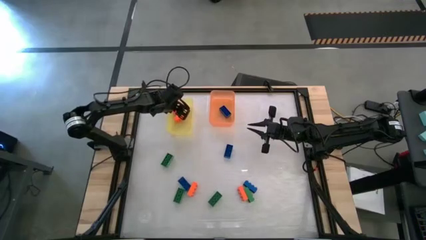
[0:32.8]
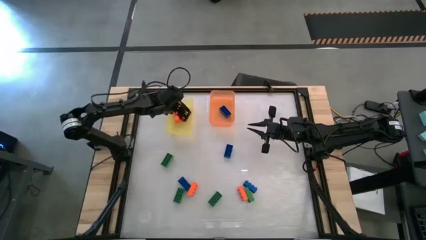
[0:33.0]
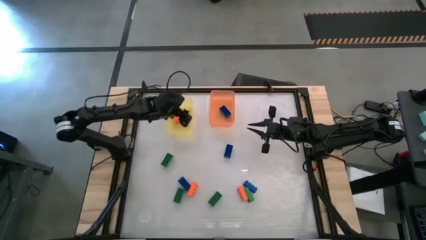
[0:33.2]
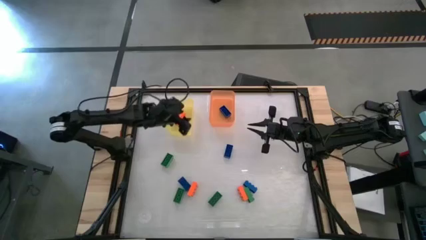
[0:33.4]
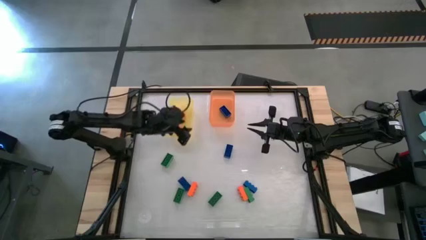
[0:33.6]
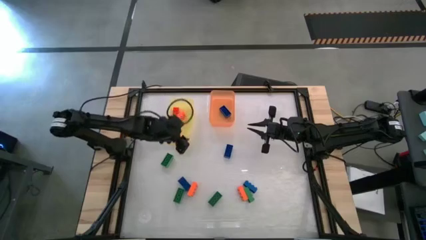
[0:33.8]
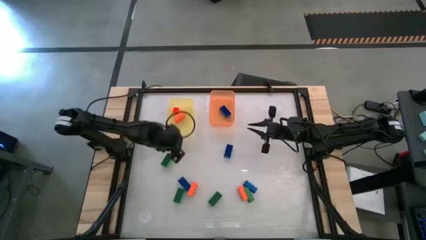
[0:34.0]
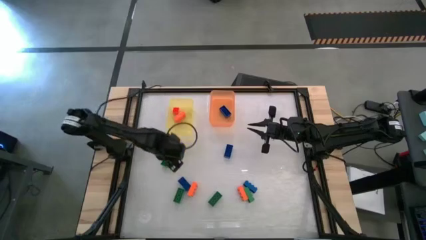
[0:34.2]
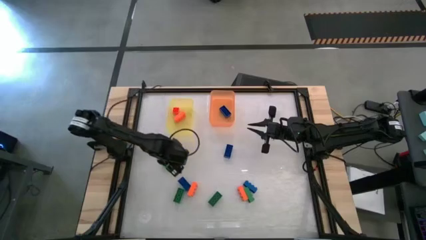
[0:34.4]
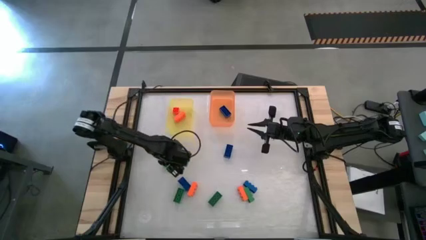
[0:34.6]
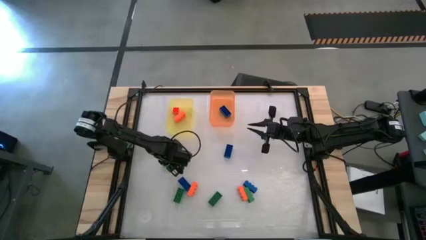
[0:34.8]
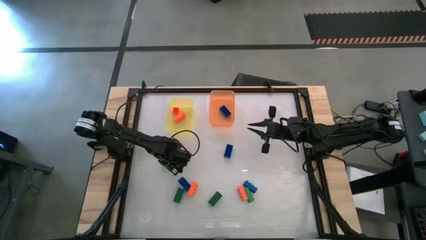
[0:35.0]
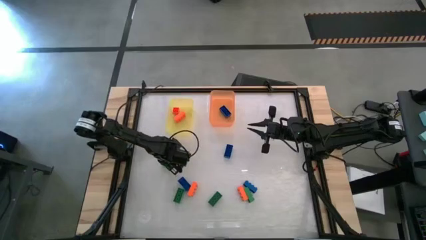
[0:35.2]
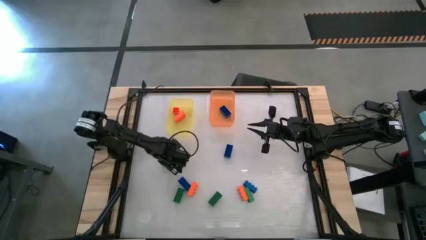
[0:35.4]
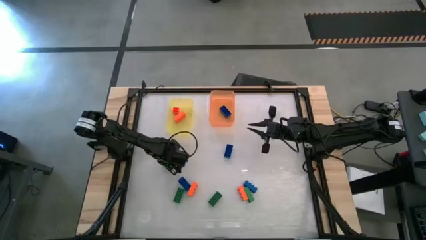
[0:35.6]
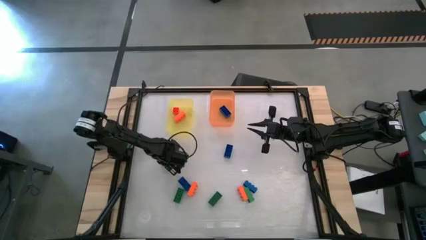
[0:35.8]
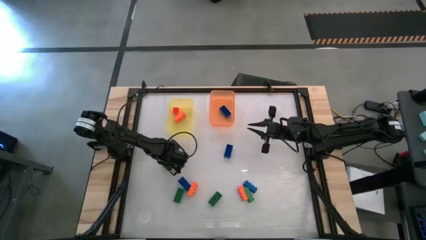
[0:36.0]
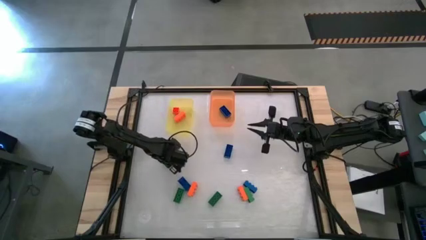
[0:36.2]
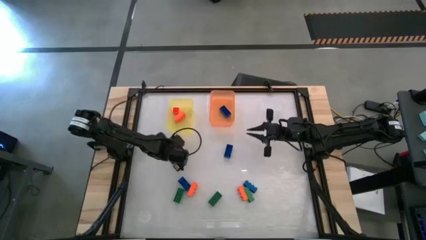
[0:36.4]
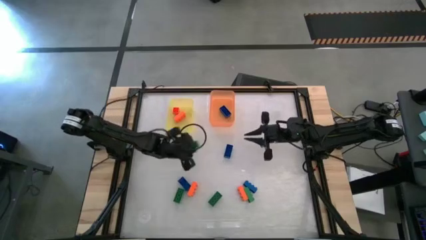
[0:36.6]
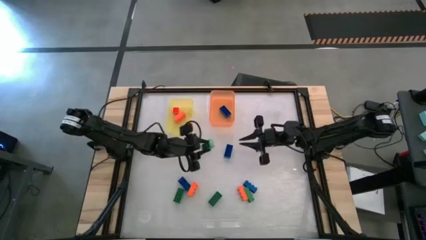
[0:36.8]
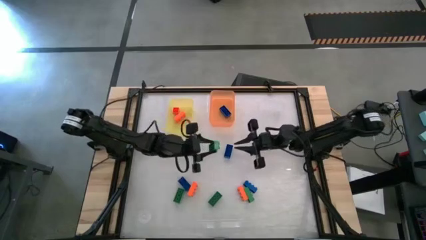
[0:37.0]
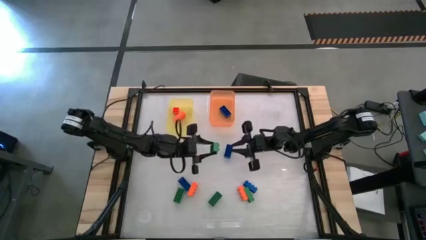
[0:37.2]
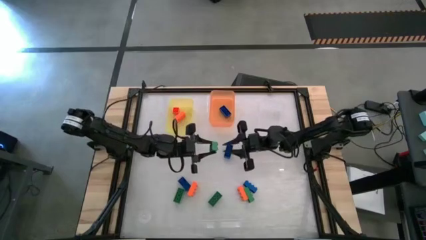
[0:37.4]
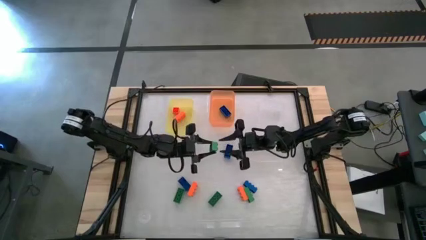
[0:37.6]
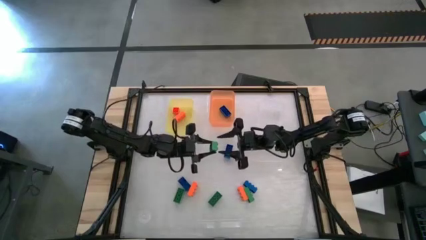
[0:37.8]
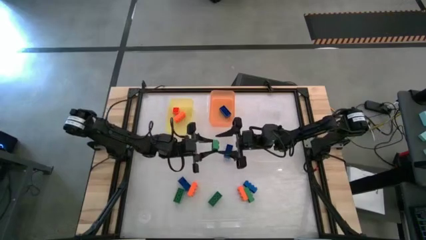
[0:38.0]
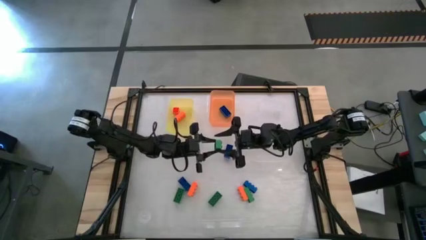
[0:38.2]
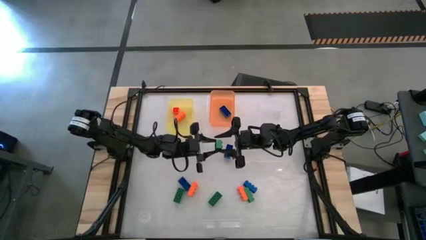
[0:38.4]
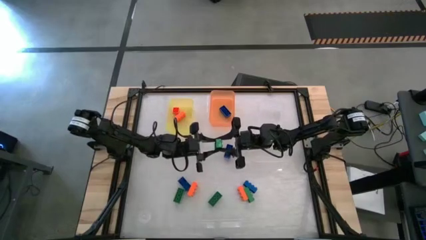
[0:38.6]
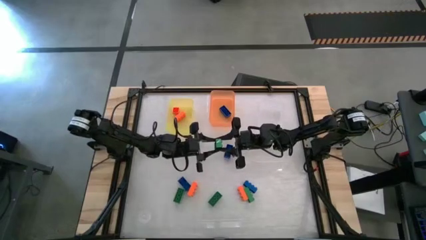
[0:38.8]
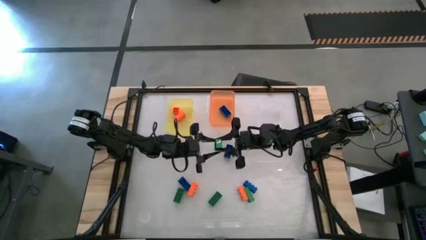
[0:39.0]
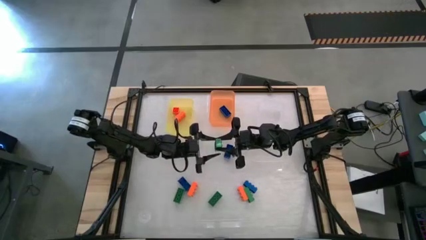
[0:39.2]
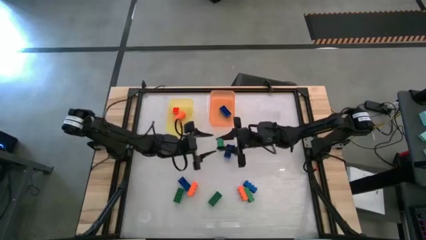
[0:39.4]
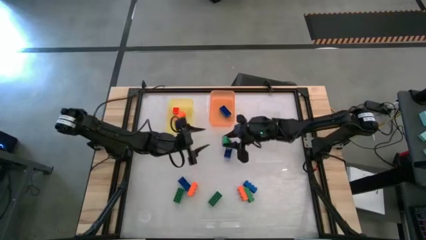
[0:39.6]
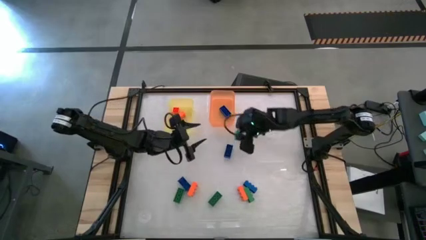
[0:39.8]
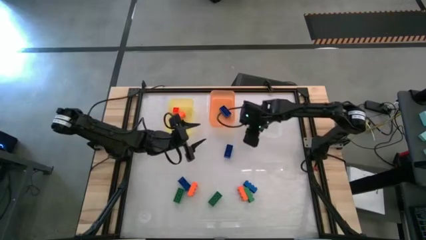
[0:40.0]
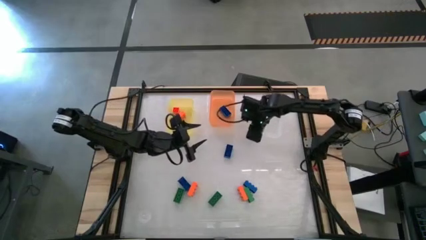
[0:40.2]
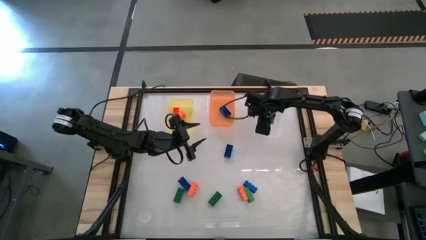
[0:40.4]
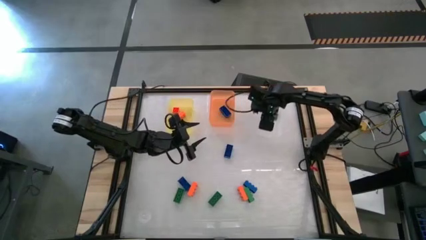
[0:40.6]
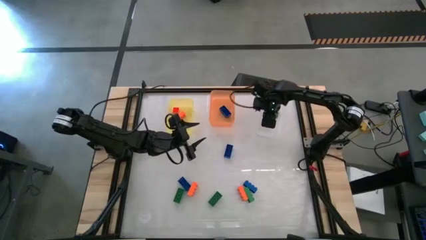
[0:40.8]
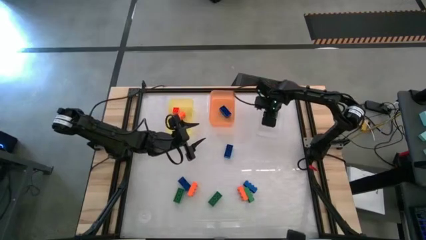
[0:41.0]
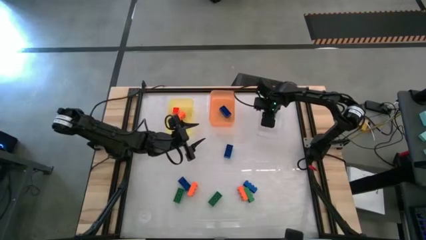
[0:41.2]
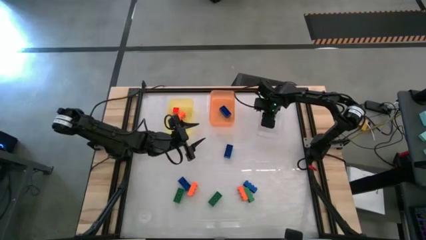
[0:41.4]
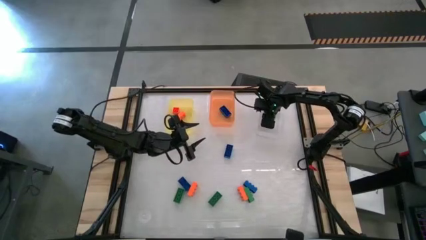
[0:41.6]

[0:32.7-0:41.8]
Task: Sort & place blocks by color
Put the green game piece into the transparent bin

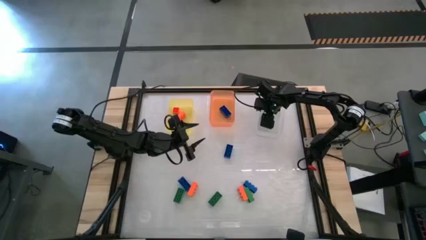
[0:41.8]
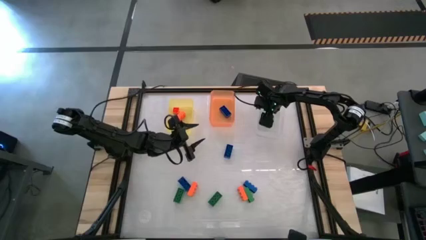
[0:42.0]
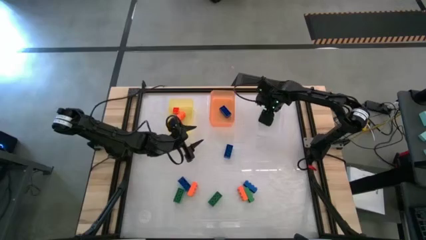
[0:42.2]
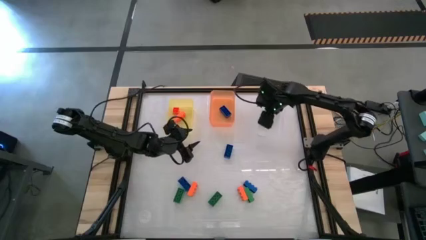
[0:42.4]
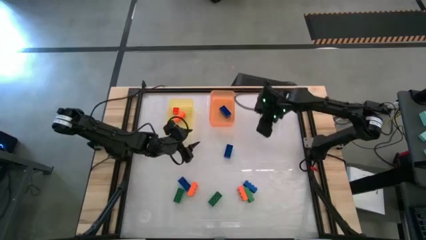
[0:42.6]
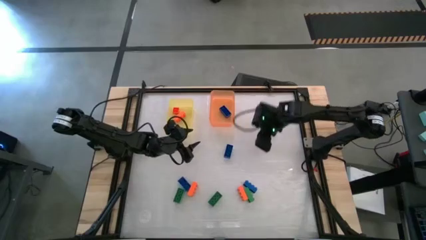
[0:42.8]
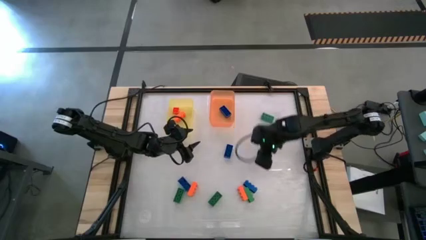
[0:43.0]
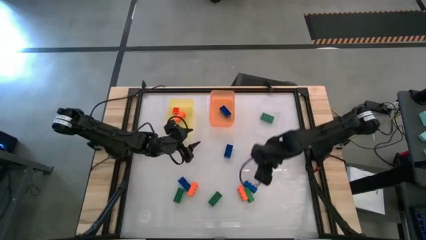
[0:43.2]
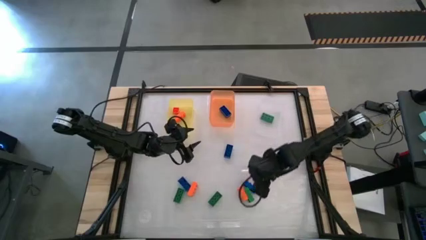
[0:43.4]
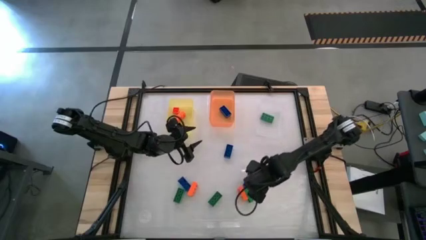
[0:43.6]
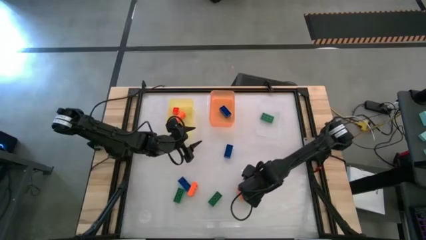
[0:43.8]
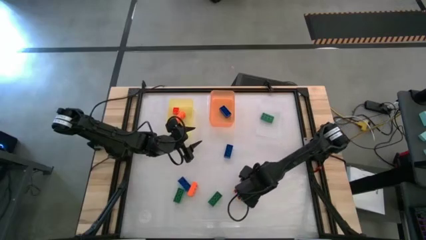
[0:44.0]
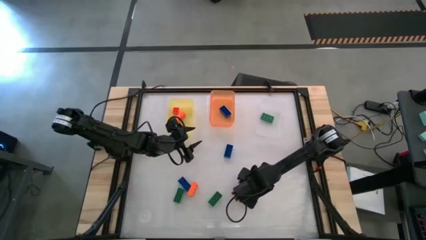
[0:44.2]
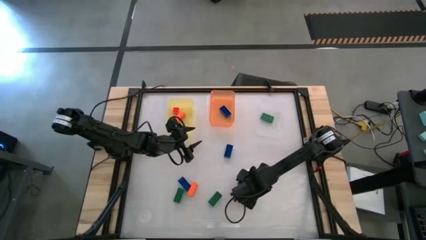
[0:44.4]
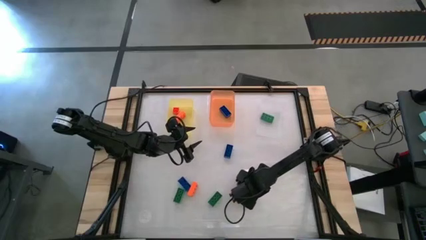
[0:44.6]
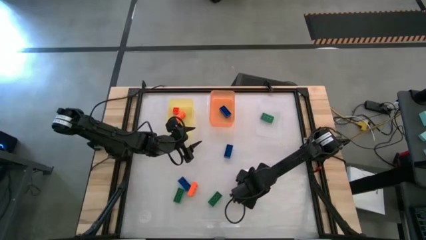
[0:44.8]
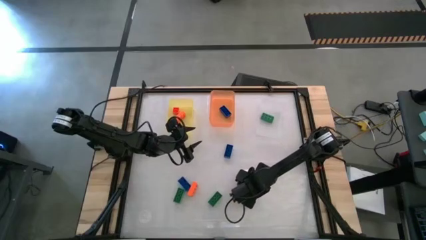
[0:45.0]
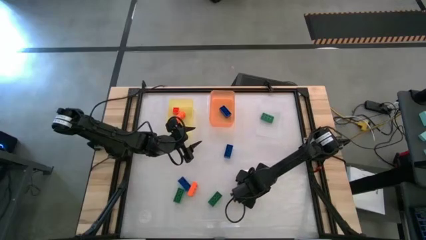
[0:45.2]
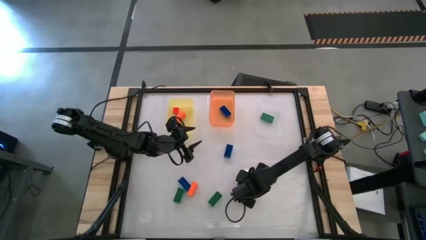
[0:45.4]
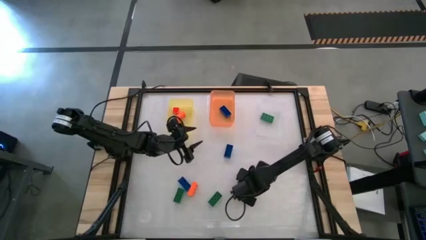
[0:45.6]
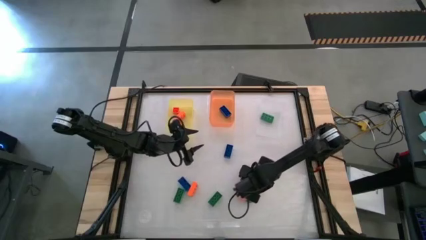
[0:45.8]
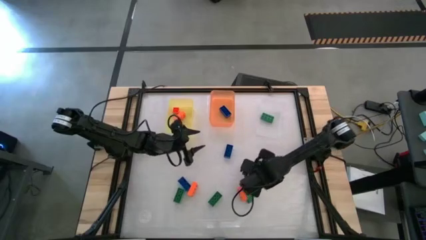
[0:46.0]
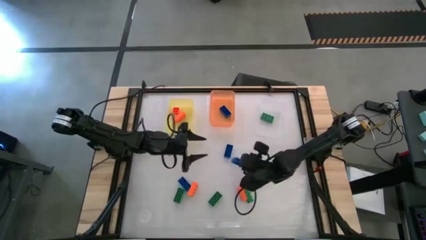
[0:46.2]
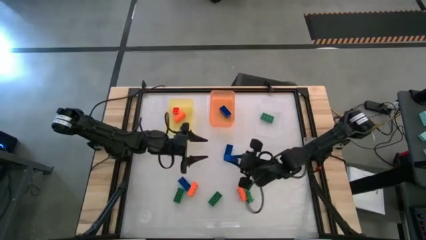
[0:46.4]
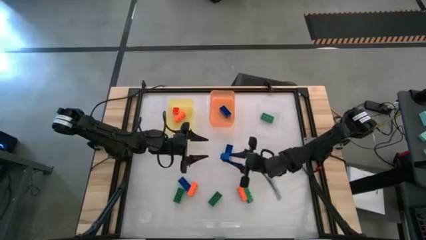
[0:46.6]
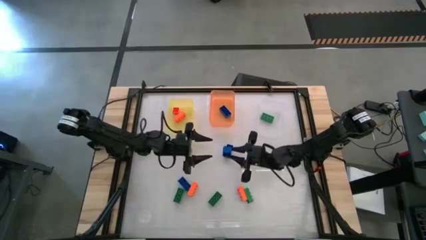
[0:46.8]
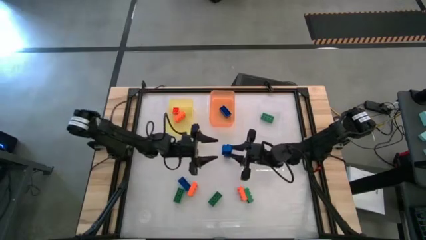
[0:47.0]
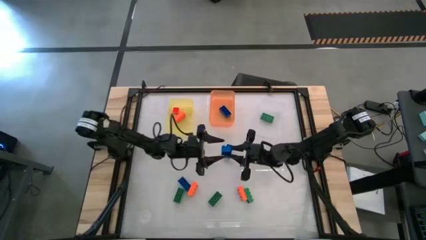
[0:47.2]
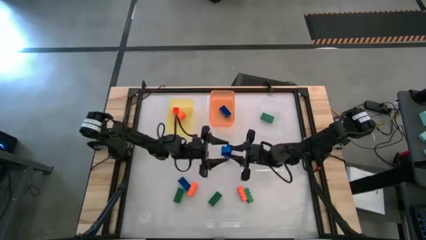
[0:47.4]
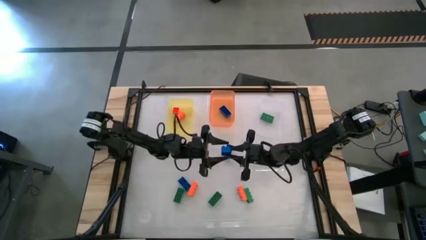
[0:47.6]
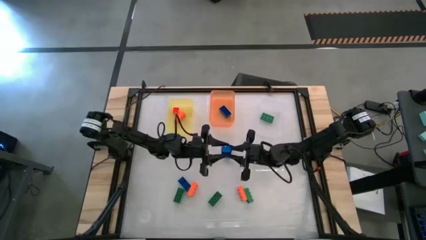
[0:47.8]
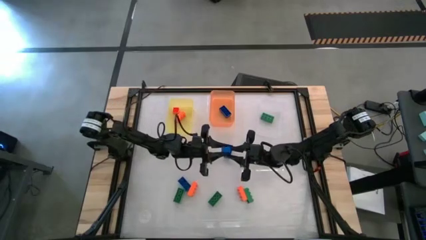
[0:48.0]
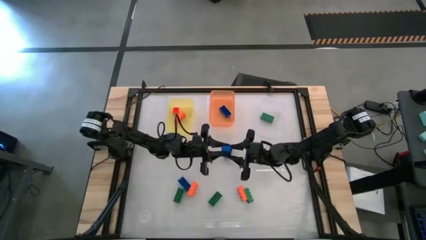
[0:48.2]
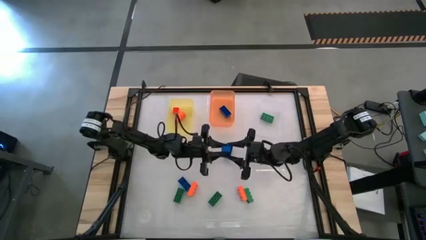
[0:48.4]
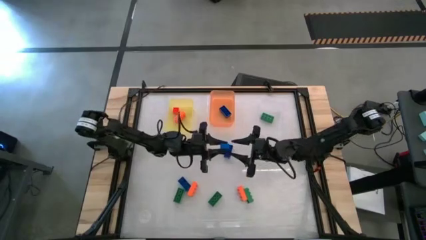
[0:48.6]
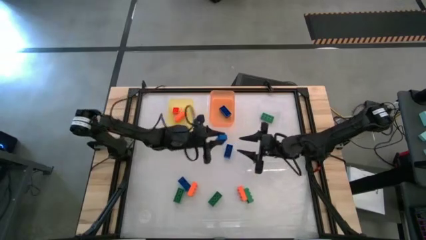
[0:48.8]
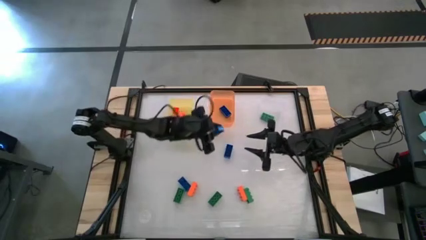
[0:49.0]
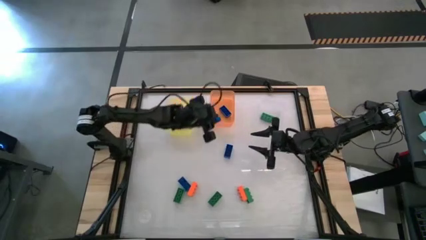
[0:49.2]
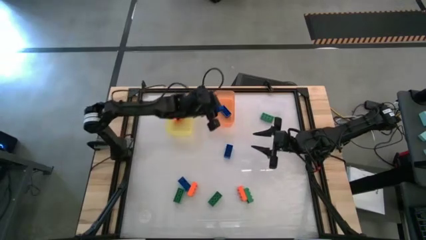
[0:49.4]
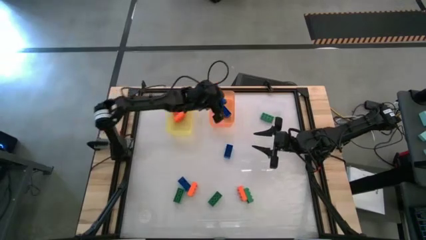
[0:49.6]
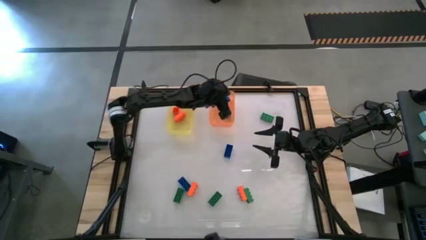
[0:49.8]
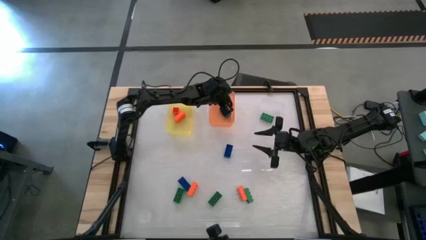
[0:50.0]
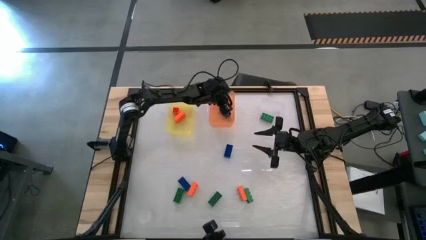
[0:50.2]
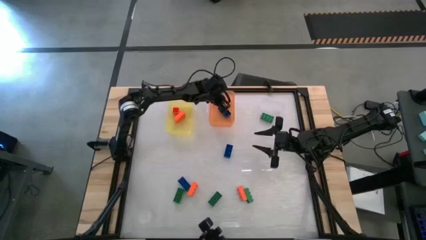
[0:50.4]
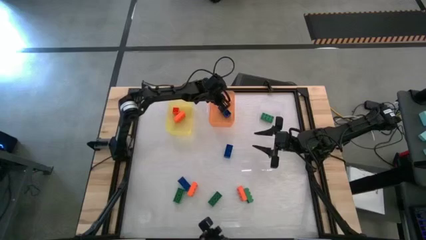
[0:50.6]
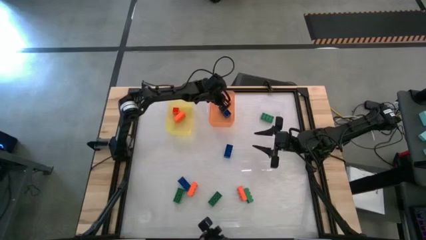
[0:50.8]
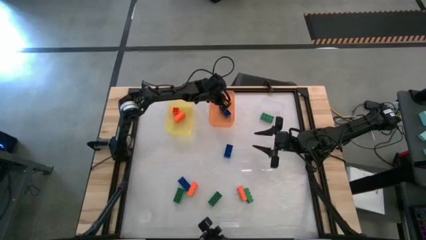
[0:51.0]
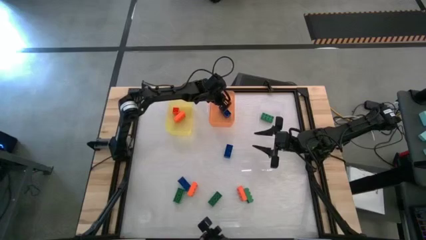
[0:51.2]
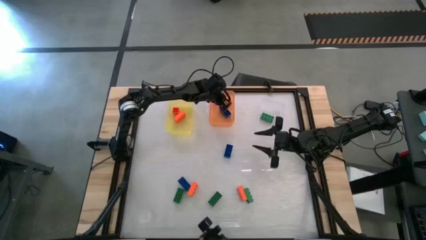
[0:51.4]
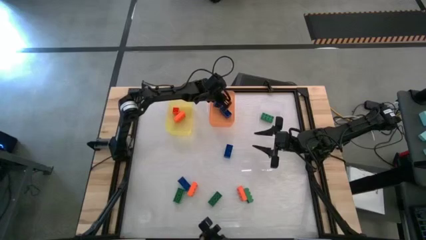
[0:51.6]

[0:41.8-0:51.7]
Put the blue game piece into the orange bin
